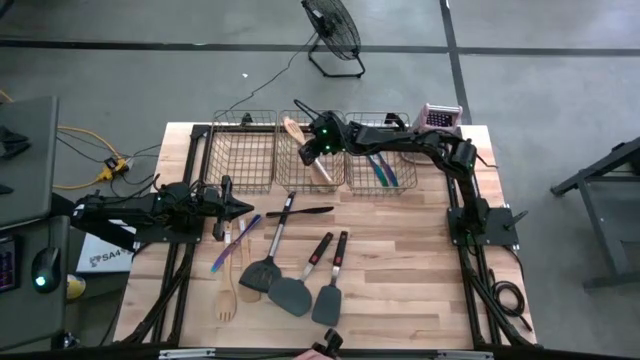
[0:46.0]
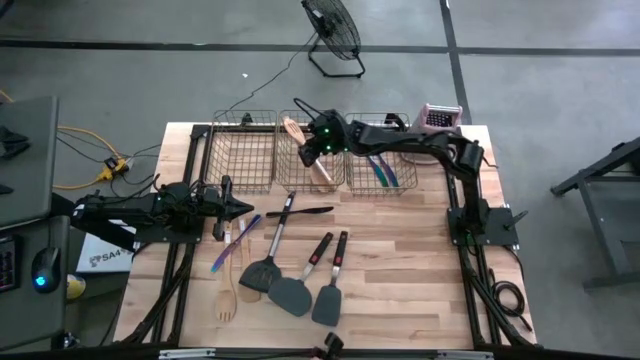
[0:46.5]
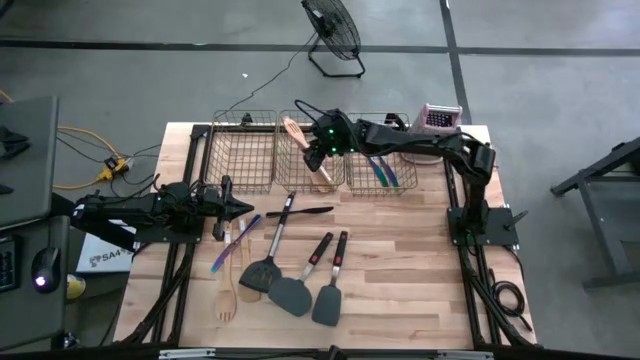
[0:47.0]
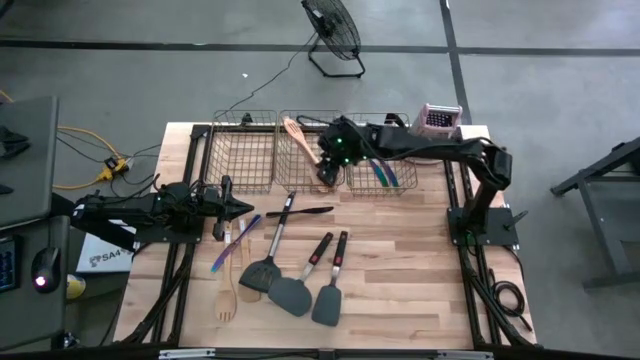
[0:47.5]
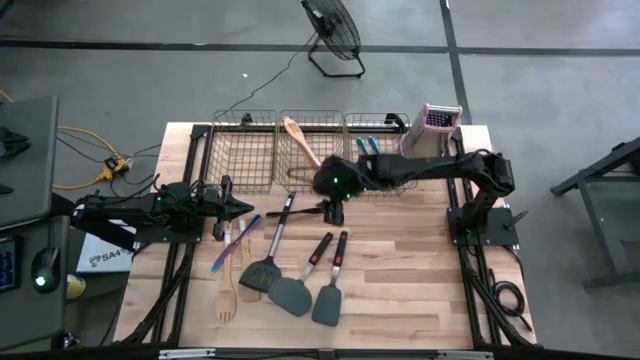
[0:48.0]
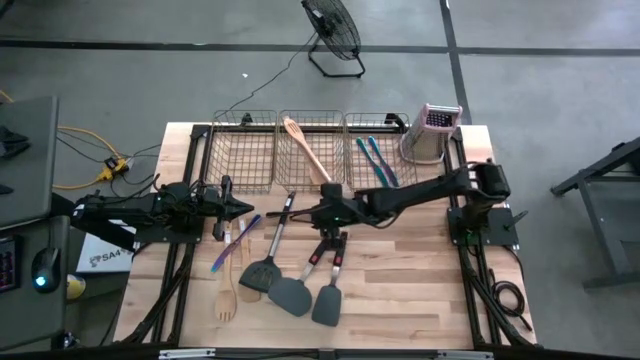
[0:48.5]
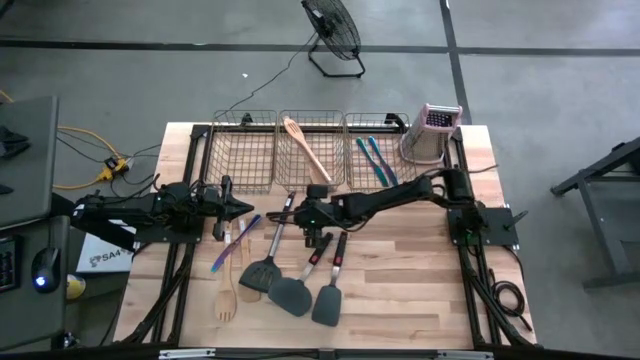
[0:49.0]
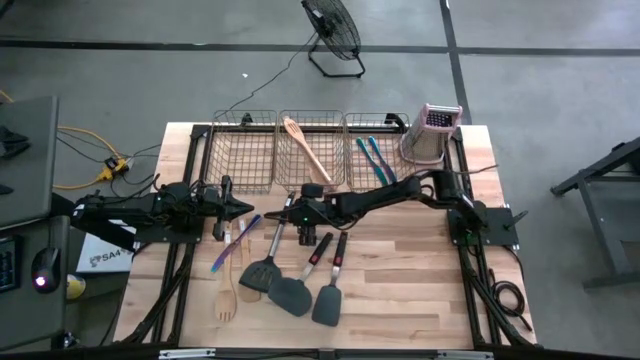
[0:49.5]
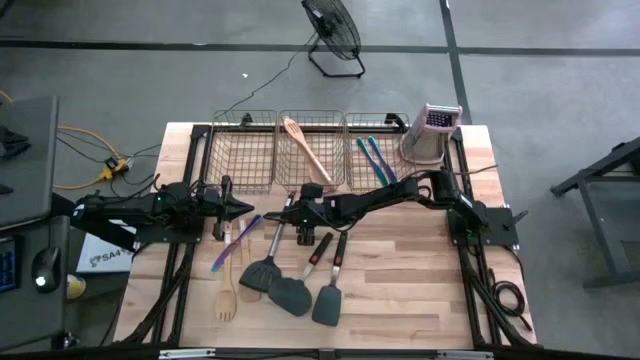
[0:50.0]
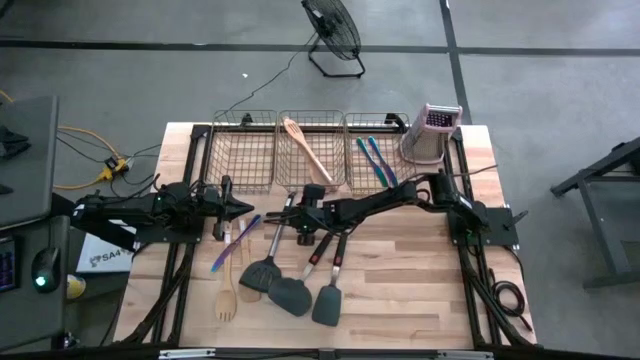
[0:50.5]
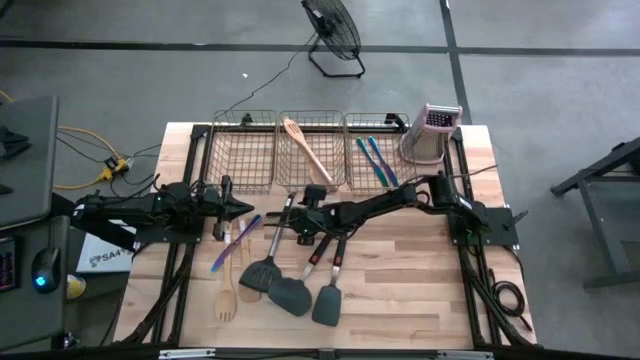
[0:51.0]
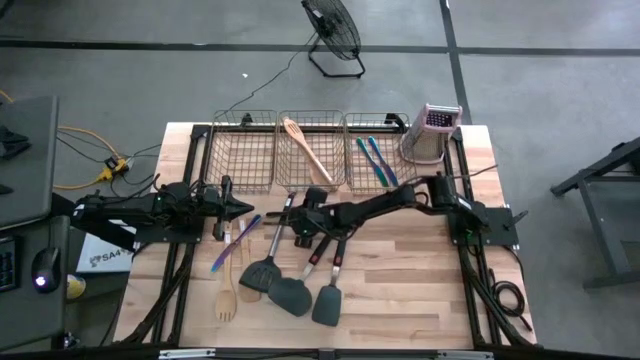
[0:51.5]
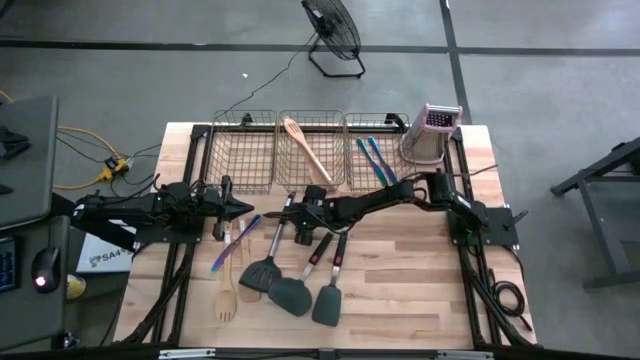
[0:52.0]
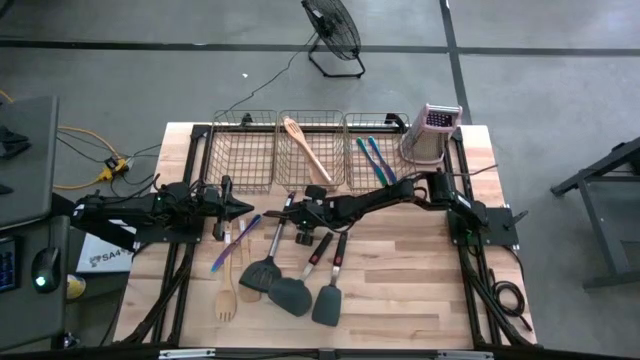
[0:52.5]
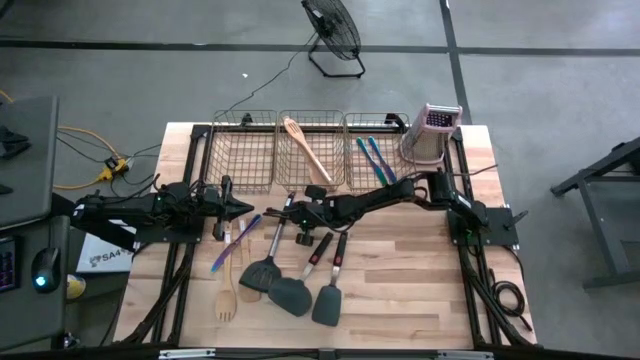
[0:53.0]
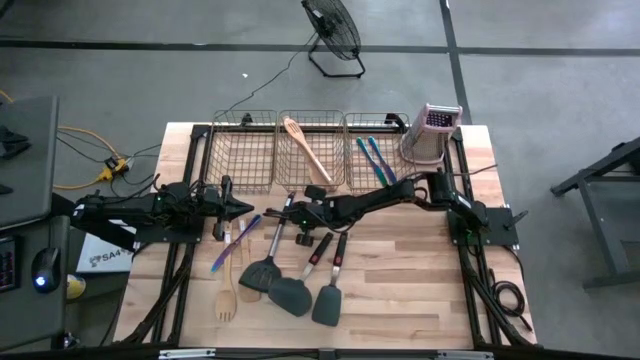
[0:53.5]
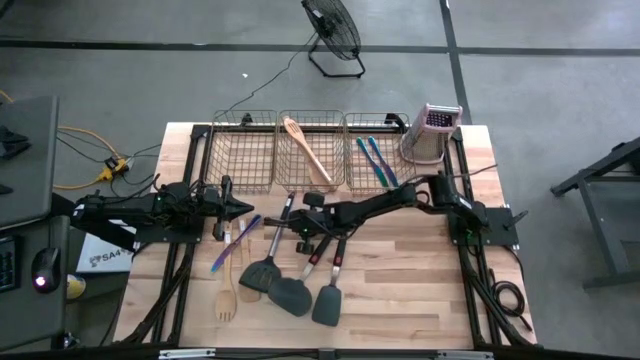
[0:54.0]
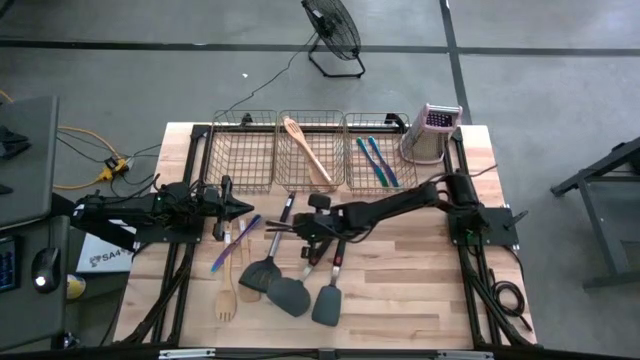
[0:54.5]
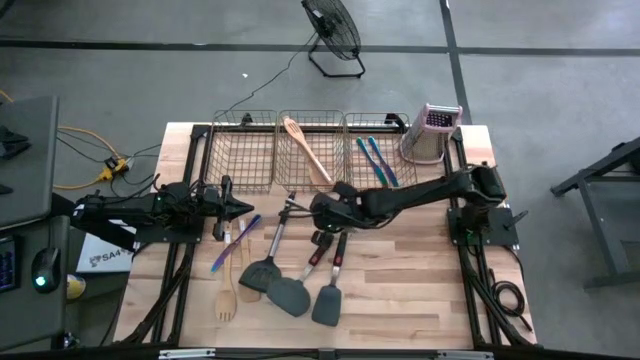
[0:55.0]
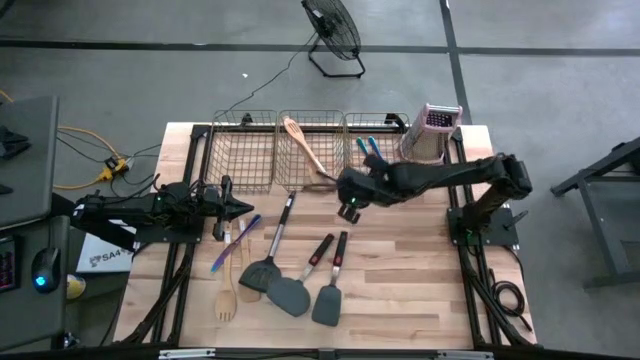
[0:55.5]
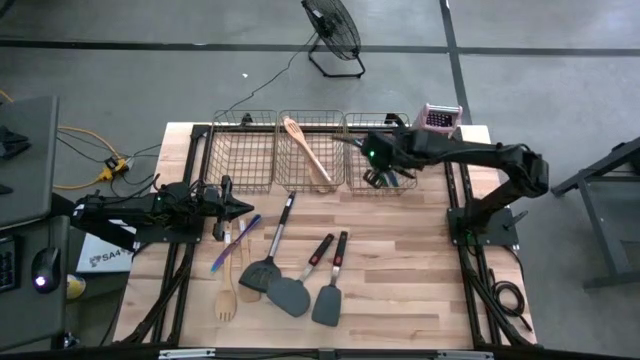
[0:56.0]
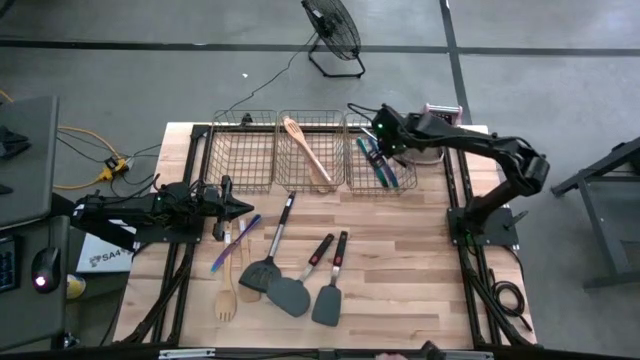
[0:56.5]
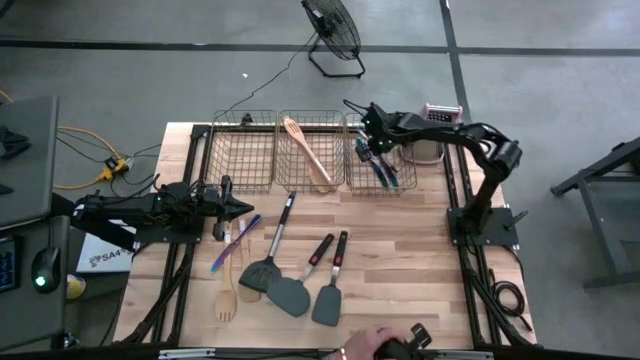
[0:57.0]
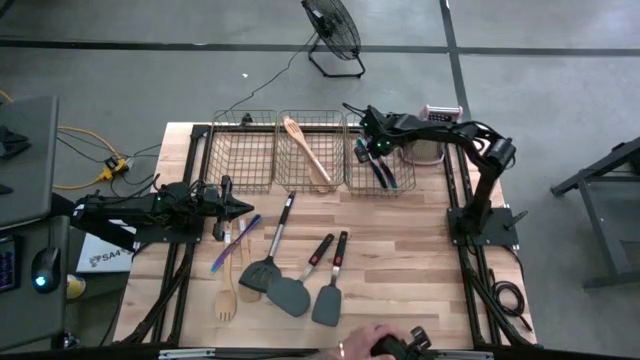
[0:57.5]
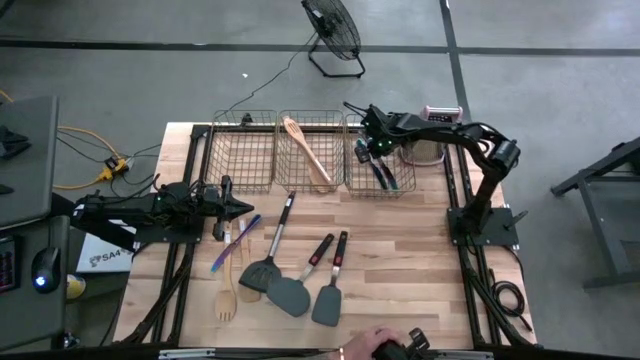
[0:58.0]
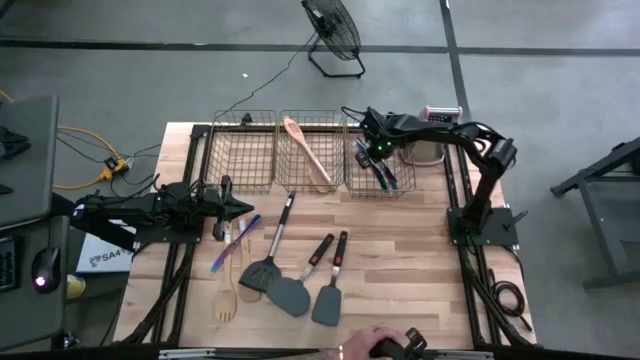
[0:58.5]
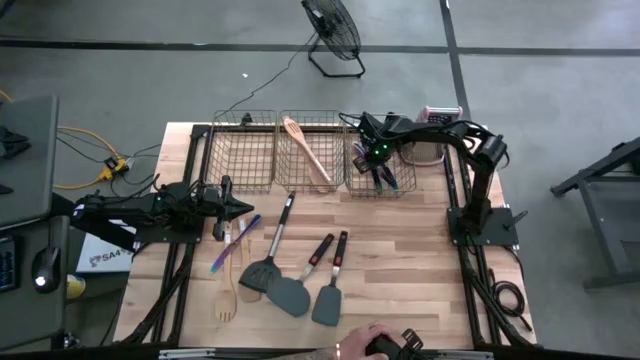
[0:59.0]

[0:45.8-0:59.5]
Task: Pick & Place Kitchen Items
Put the black knife into the right wire basket

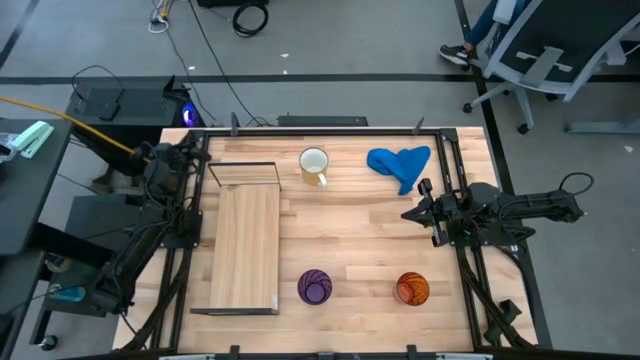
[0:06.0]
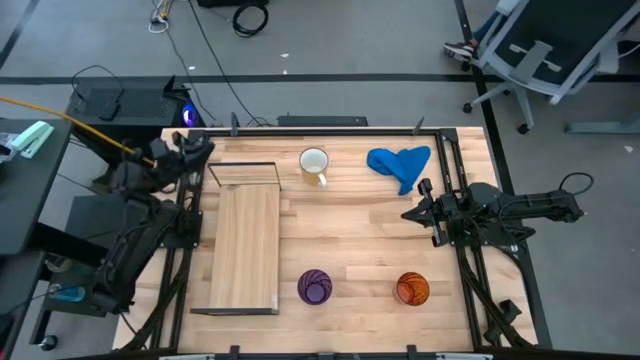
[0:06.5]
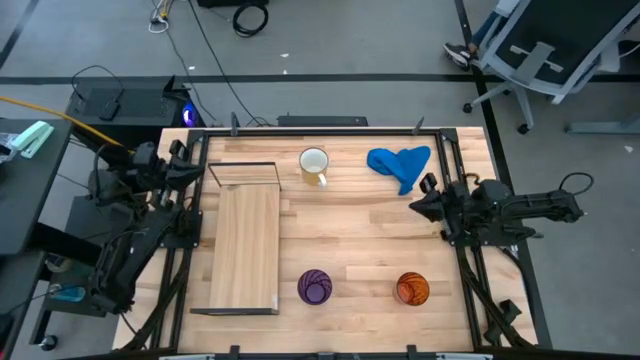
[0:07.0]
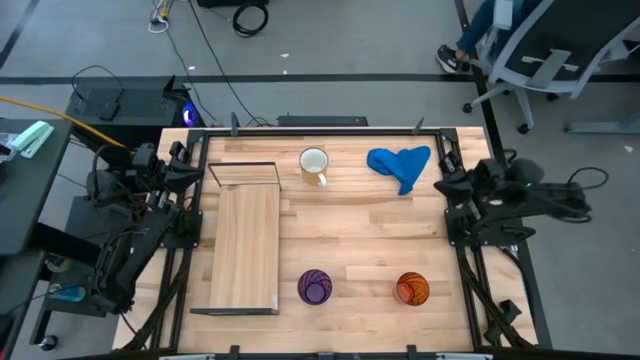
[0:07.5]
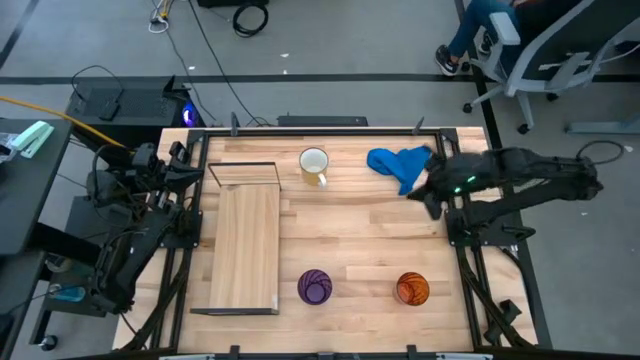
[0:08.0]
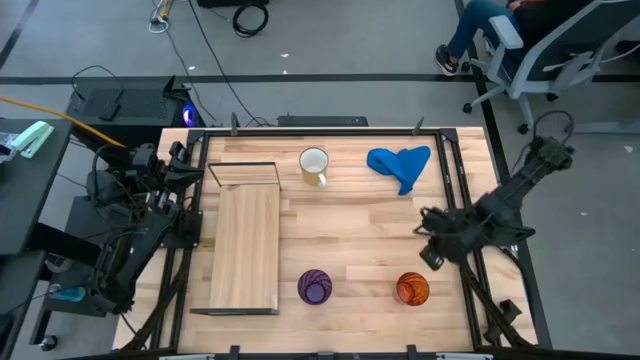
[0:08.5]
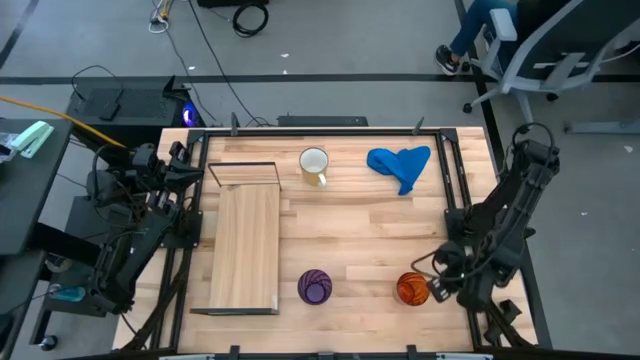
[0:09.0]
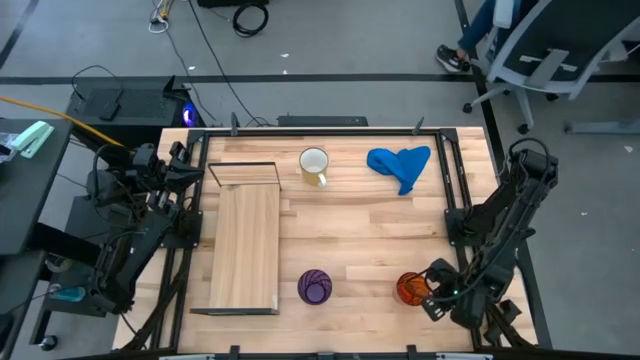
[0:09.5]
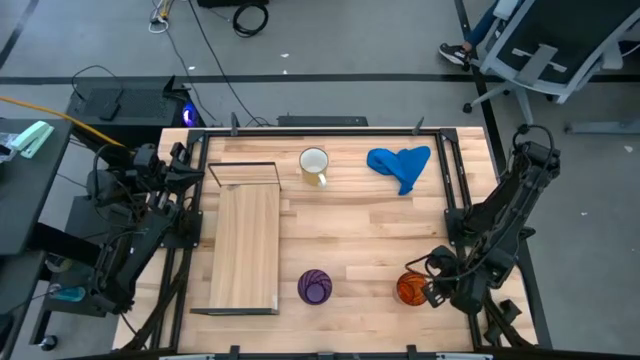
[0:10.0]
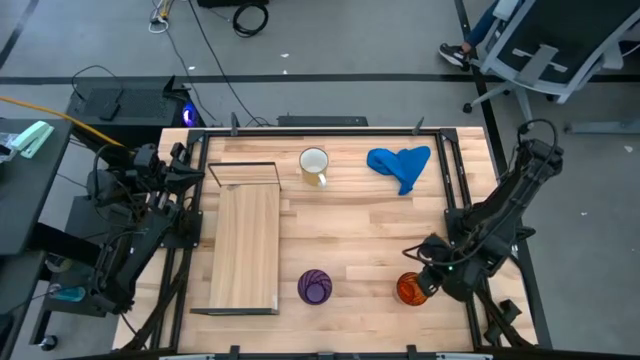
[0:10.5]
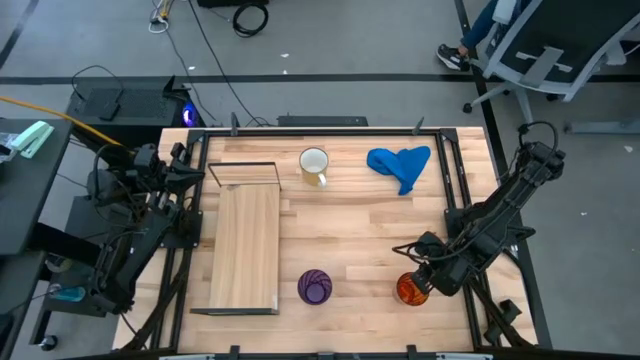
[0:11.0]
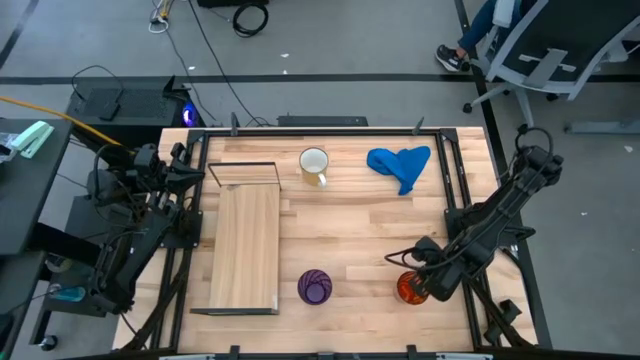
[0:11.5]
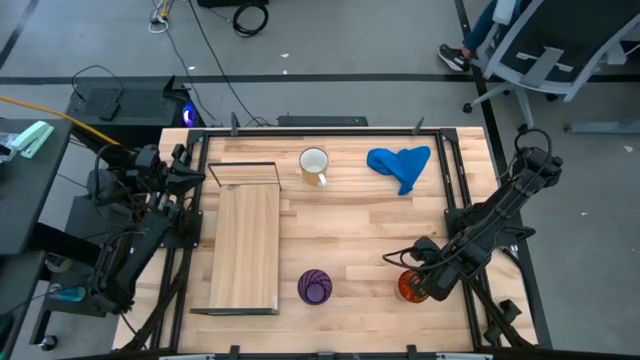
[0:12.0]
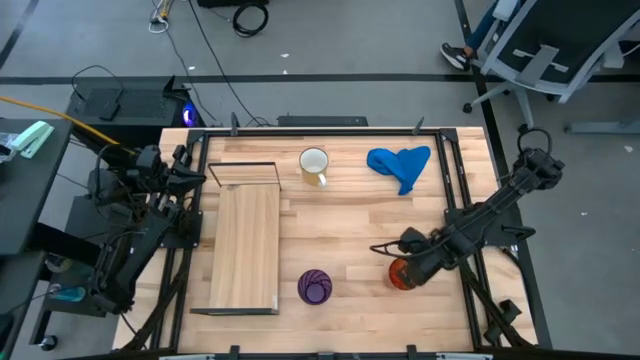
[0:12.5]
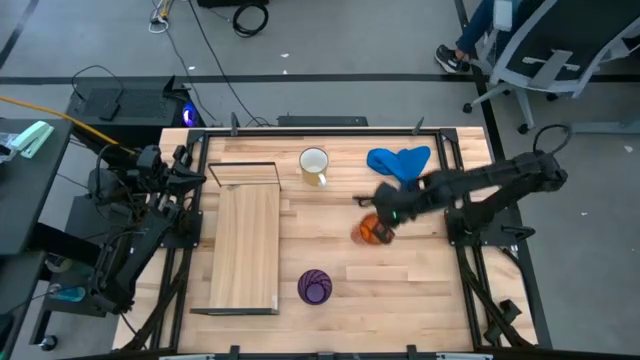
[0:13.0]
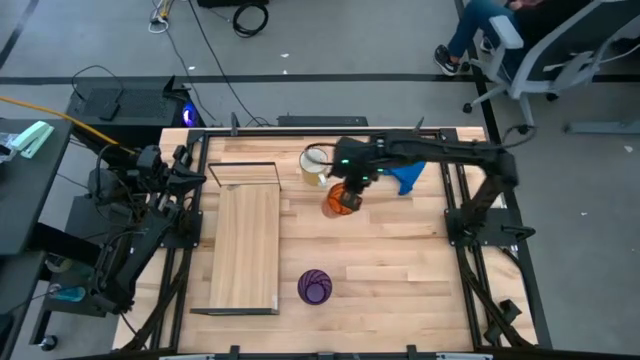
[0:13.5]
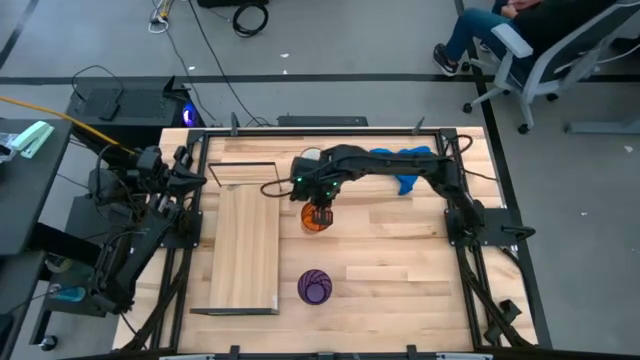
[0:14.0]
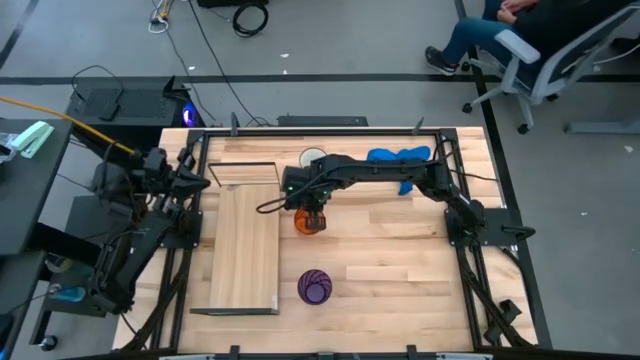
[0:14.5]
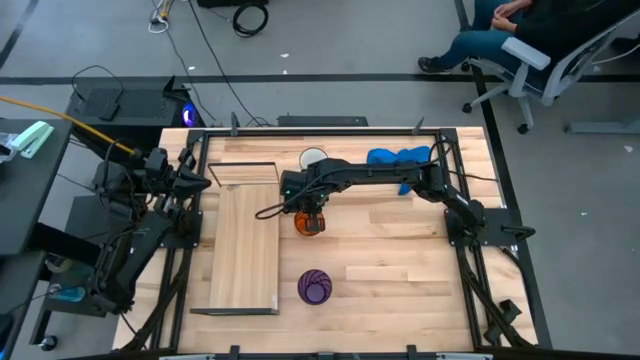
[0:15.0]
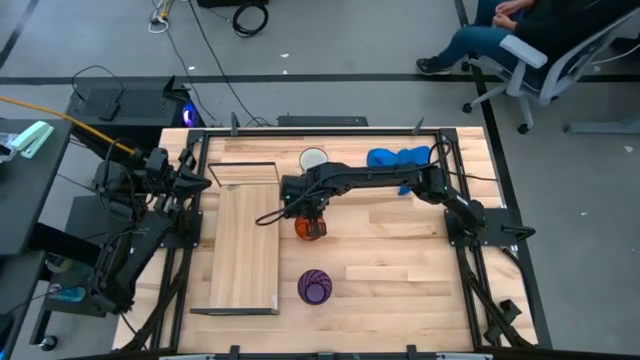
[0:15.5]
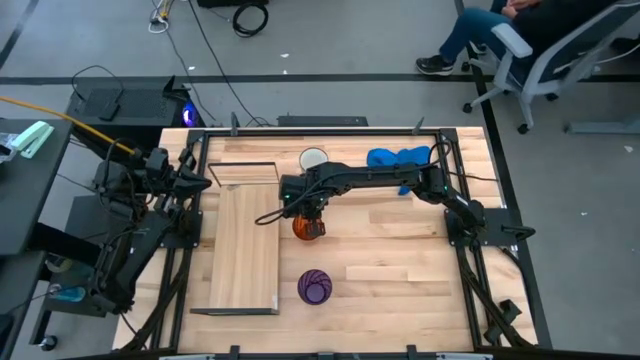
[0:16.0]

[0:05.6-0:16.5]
Task: Stack small to large cups/mugs on shelf
Move the brown cup to the center of the table
